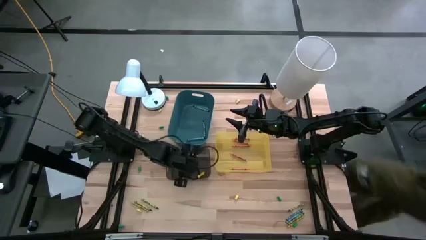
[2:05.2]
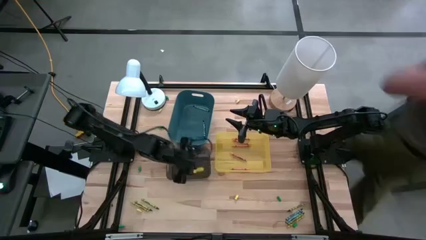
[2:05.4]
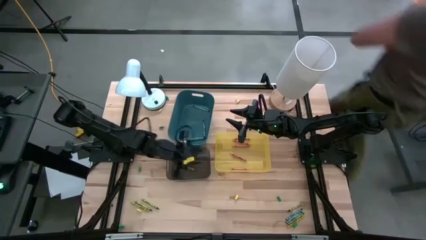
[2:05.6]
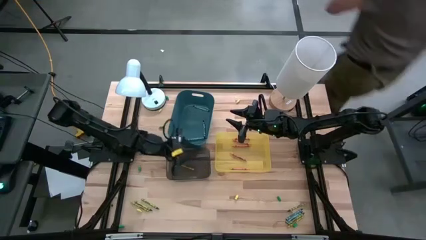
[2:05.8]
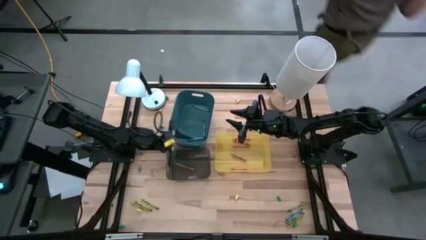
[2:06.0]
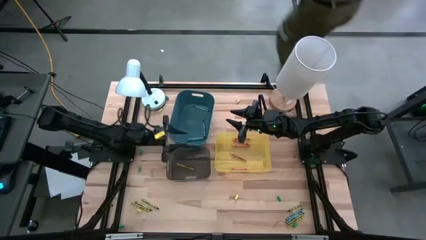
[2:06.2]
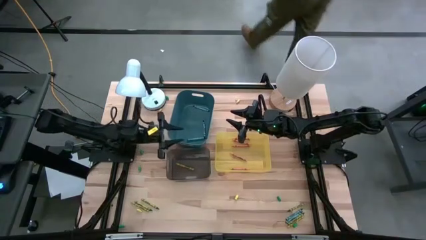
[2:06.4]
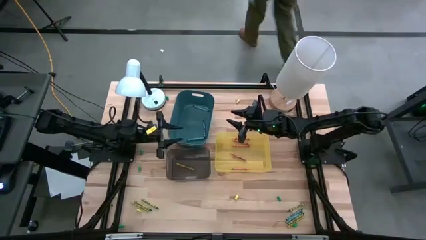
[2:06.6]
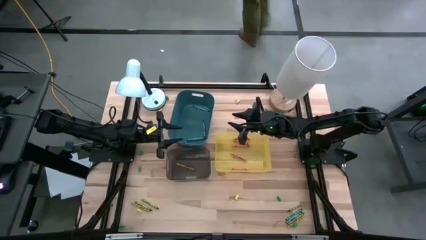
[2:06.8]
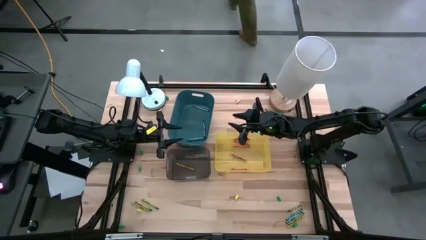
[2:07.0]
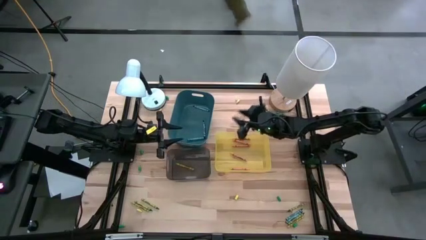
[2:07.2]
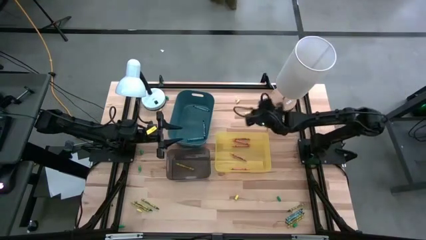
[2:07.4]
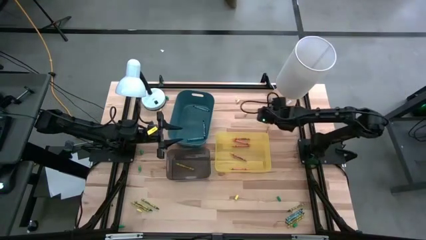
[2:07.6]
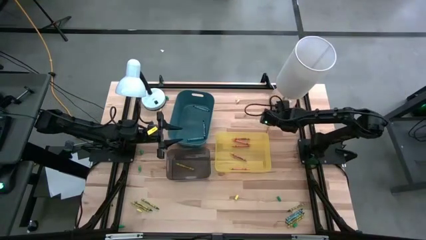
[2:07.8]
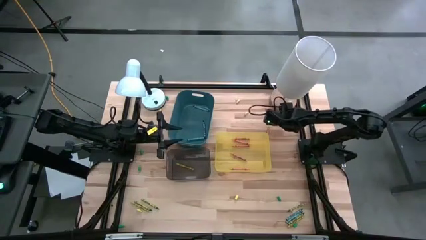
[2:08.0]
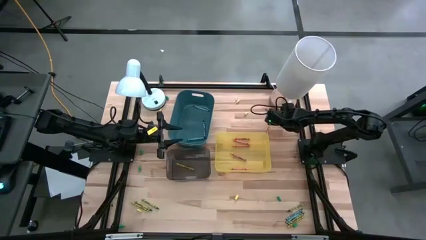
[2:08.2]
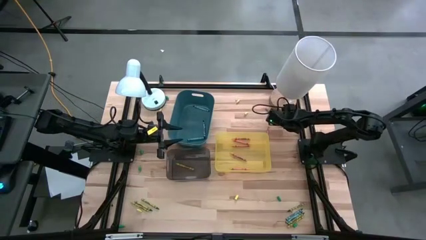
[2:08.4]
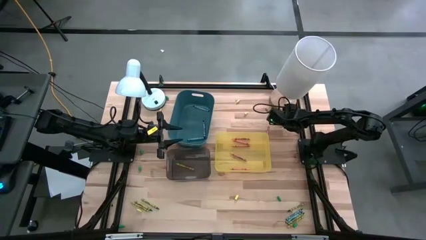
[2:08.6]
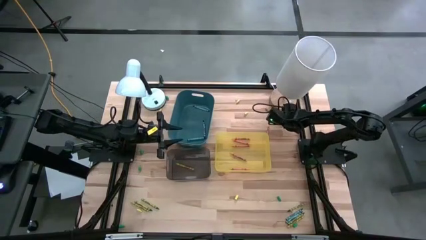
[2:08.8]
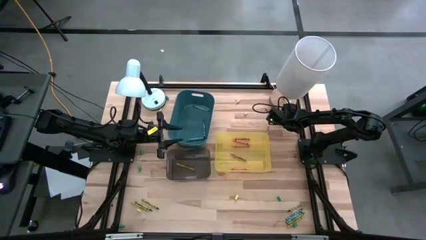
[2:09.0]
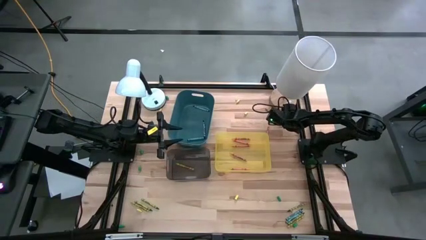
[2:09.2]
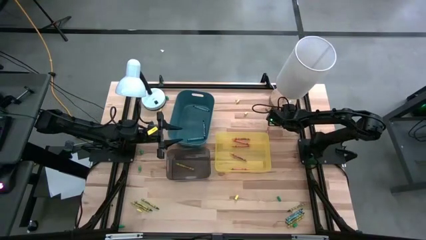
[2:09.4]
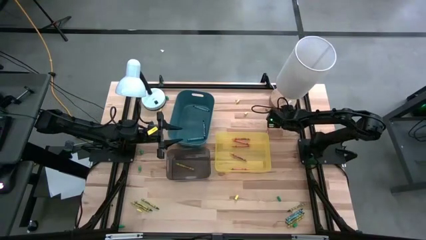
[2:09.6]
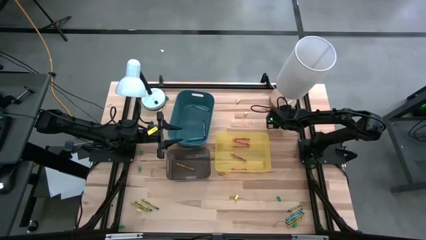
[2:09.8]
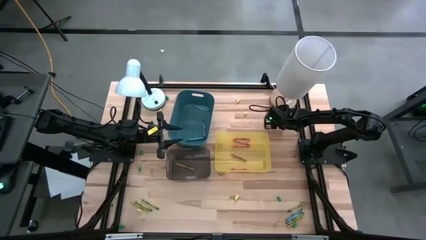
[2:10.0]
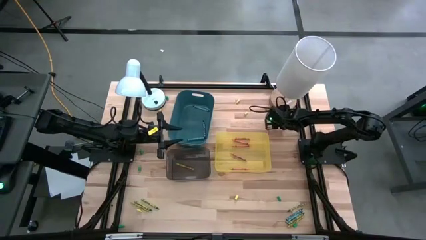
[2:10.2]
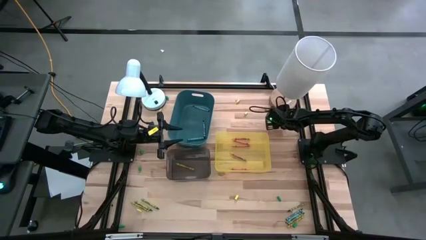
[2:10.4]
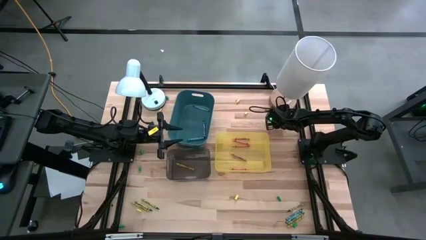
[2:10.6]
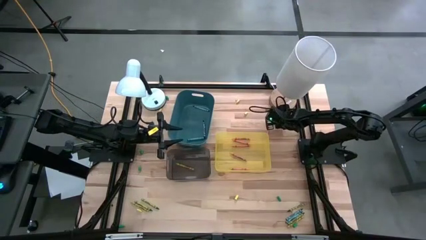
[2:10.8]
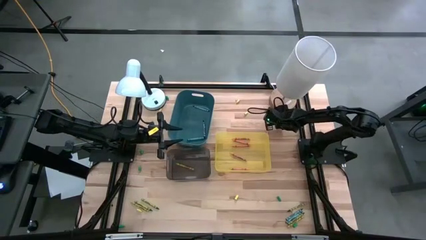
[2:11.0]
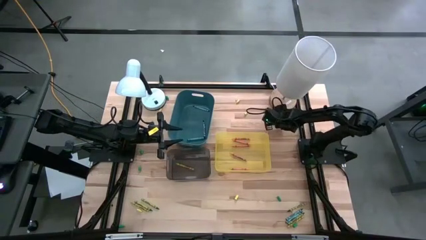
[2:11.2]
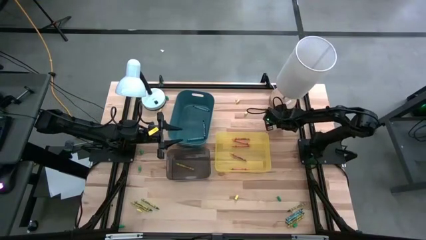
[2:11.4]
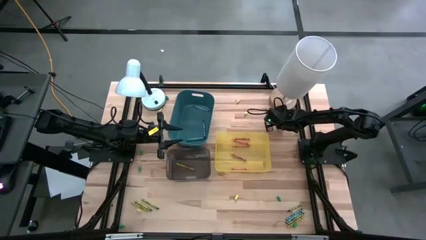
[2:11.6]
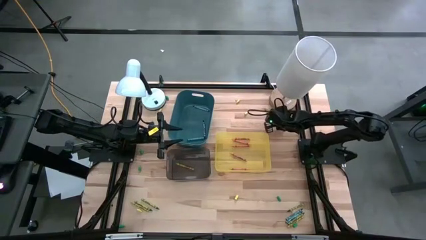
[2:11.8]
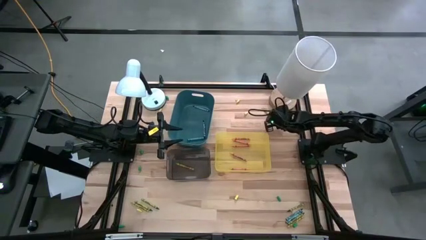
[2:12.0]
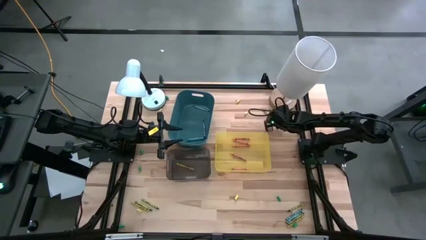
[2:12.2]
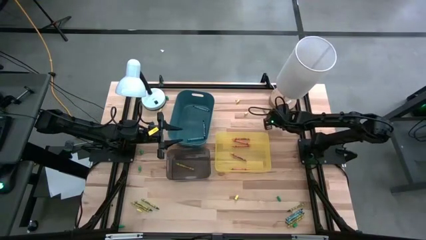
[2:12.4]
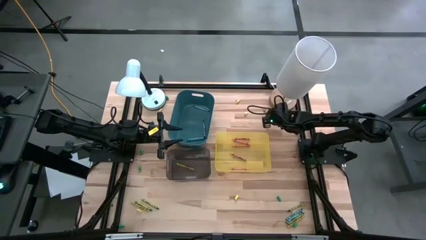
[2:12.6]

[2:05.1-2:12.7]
Task: Sort crayons
Put the light green crayon into the black bin

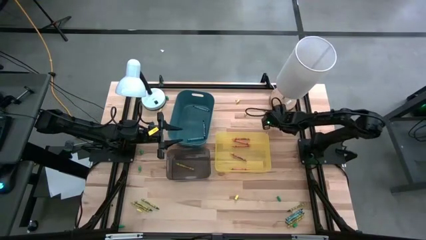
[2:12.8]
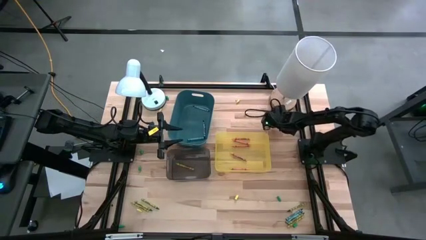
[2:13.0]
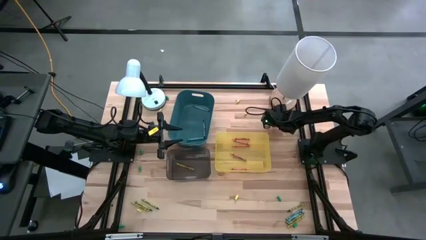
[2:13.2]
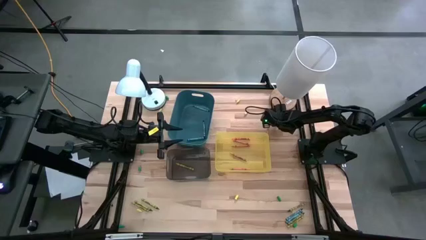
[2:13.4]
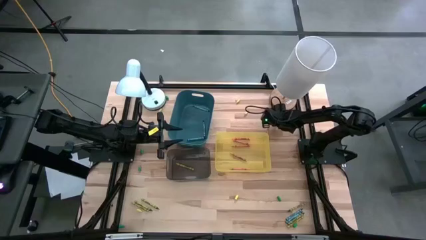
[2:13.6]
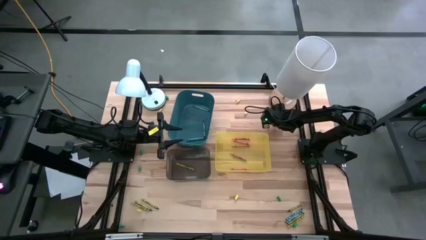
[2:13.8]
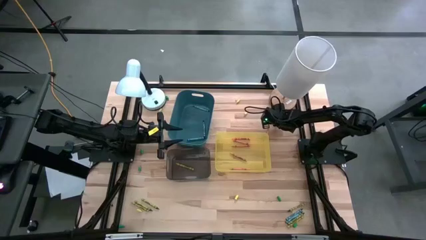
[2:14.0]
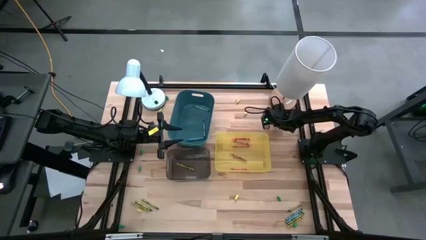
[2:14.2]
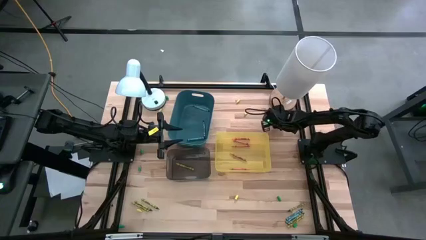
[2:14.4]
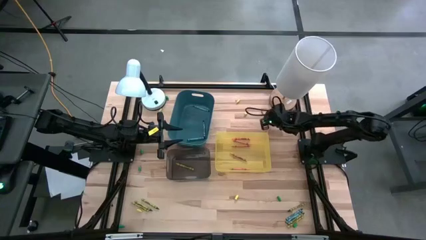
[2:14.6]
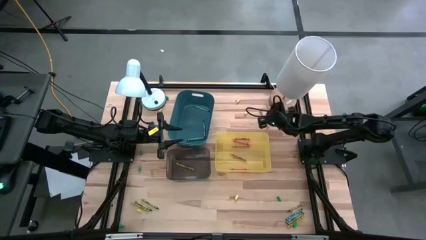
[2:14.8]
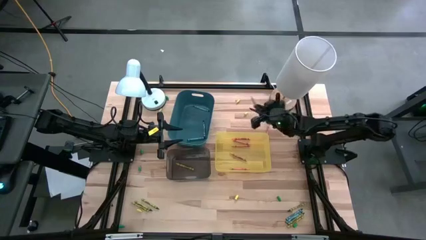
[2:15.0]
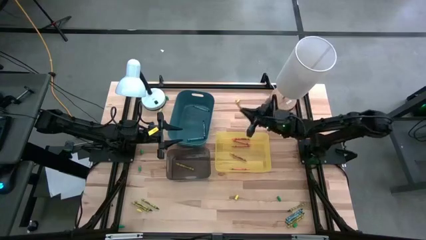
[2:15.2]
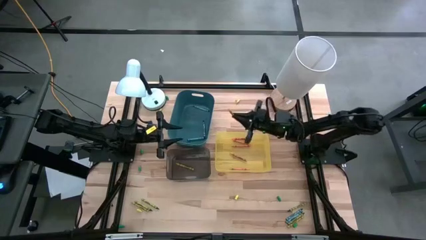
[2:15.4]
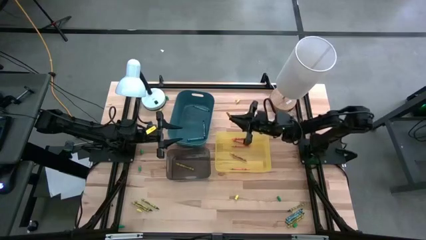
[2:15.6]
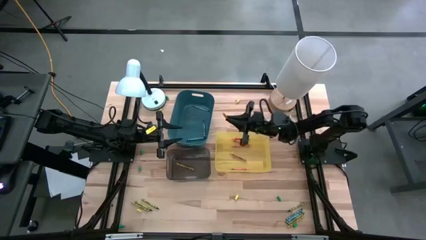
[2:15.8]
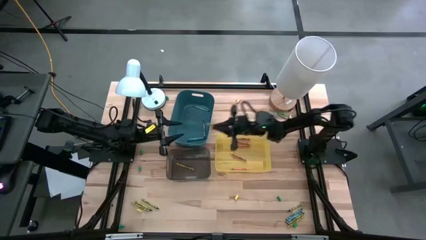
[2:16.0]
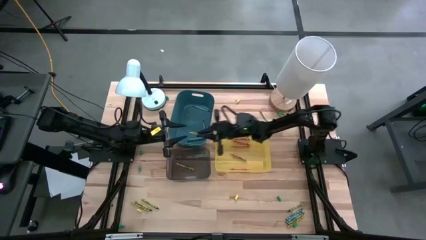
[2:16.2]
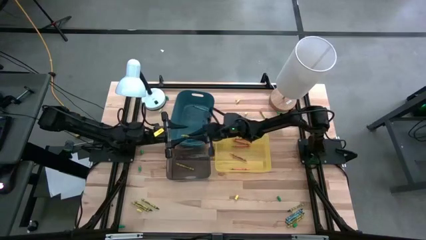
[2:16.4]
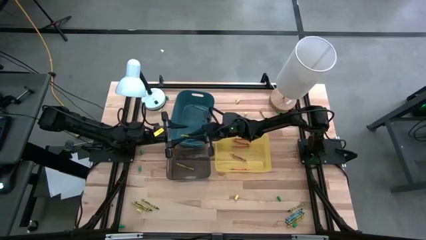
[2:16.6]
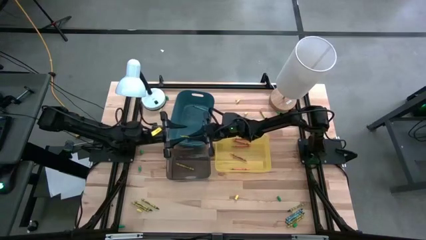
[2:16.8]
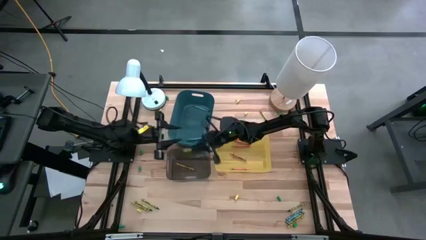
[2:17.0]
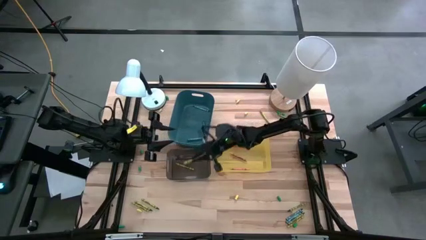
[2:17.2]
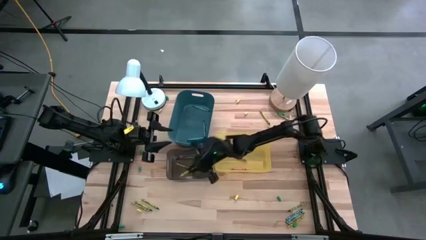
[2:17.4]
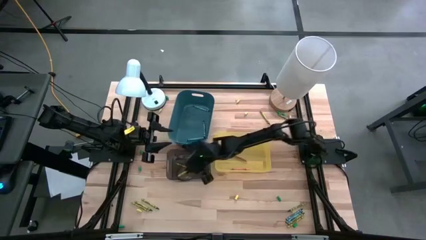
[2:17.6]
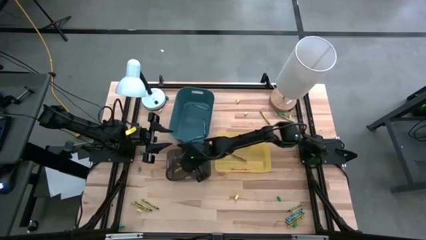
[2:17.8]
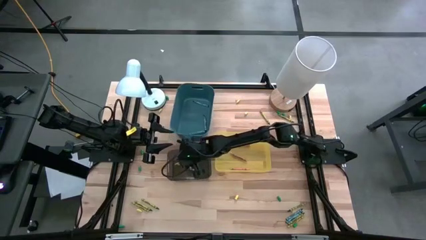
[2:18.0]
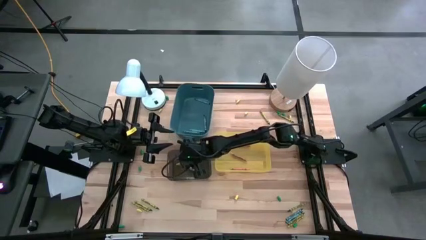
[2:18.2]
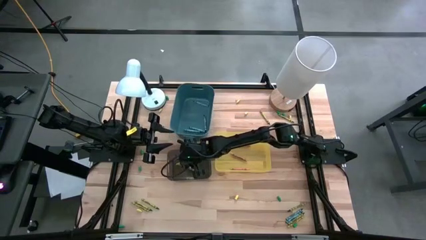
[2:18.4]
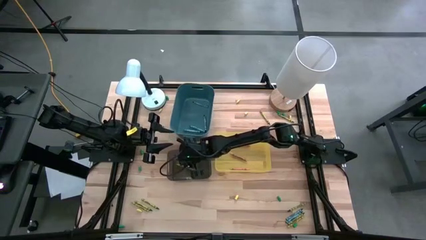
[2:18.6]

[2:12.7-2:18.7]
Put the light green crayon into the black bin

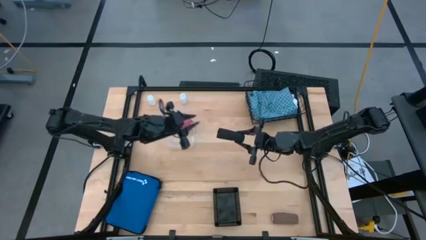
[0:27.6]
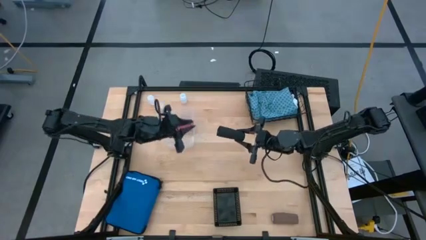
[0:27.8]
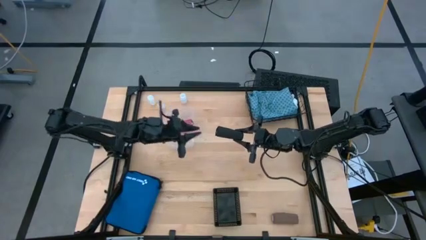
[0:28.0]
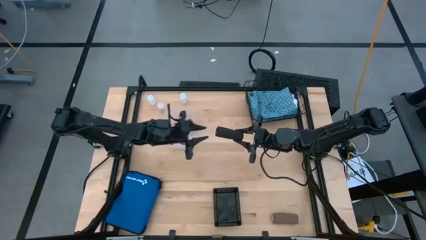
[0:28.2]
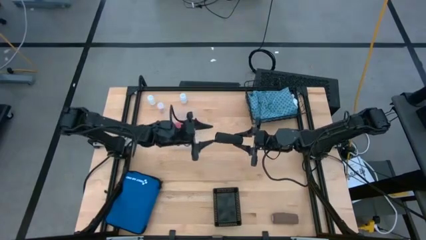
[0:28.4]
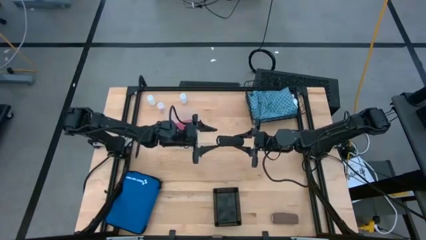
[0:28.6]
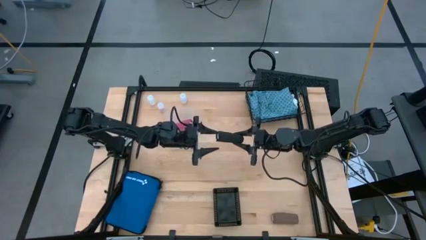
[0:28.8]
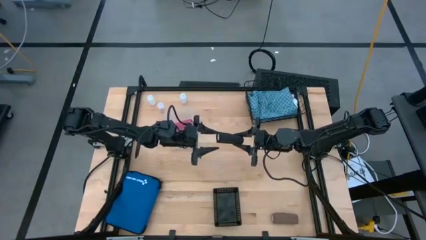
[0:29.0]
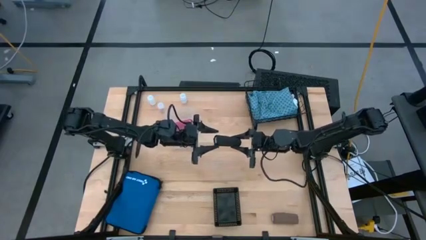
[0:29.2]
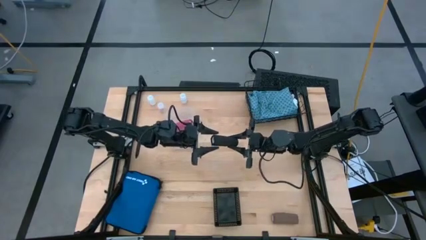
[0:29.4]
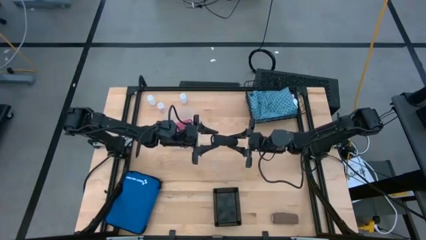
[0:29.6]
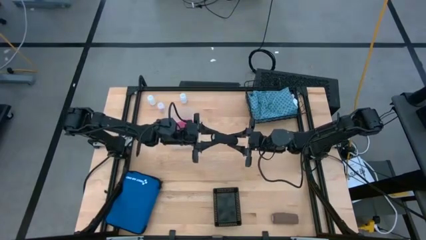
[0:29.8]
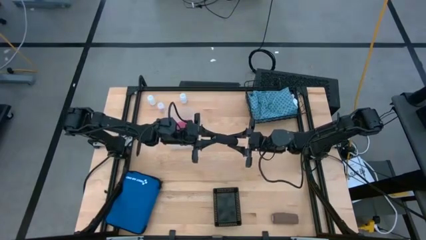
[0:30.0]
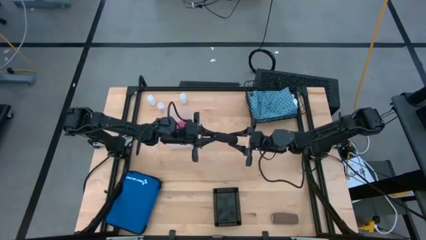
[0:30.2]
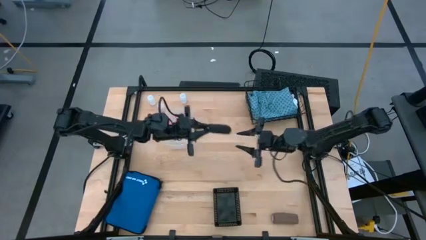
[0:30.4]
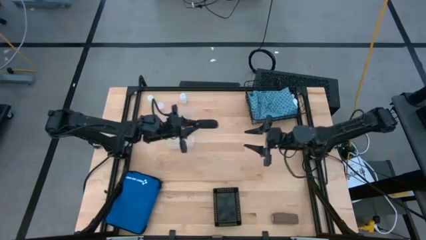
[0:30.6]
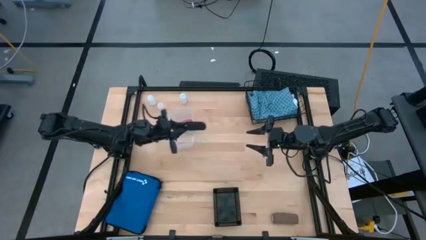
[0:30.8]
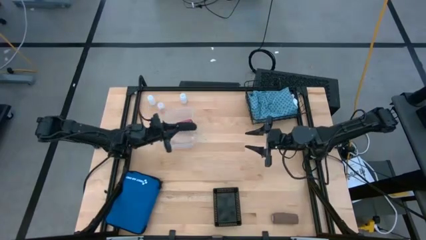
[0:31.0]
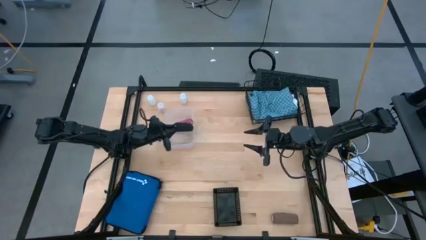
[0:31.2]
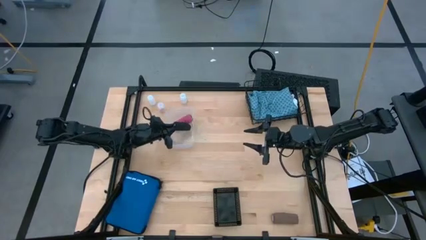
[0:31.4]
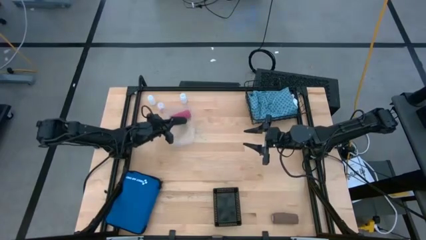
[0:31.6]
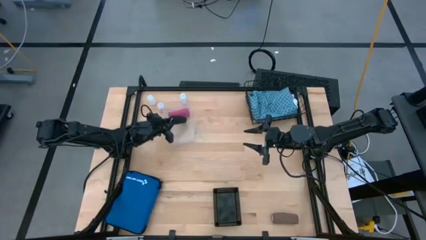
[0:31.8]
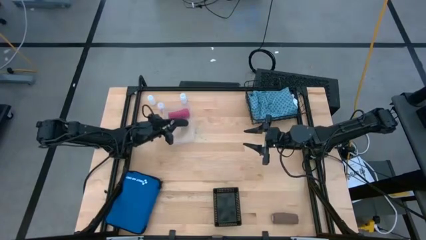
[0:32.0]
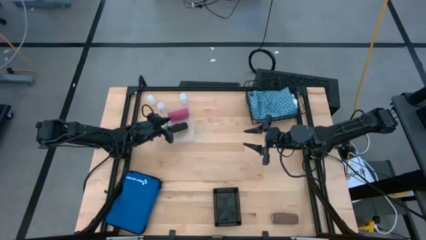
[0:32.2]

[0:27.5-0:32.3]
Task: Pick & Place Medicine items
Put the black bandage into the transparent bin
